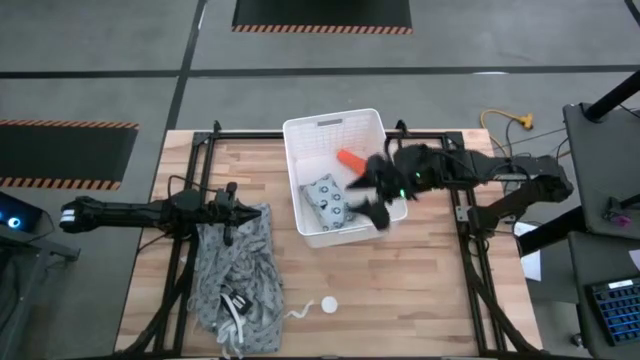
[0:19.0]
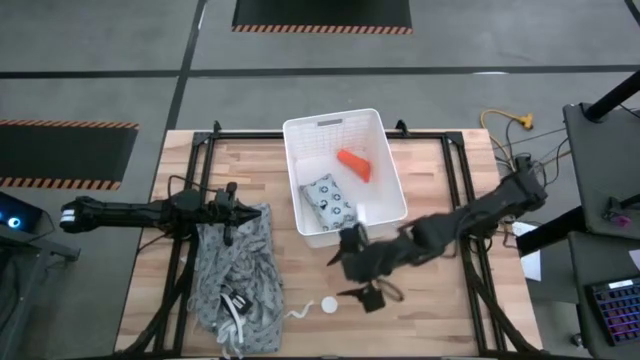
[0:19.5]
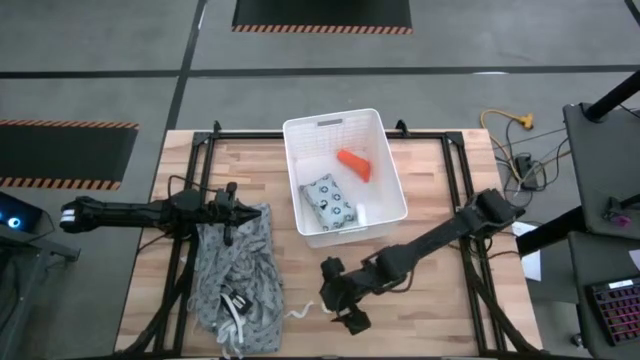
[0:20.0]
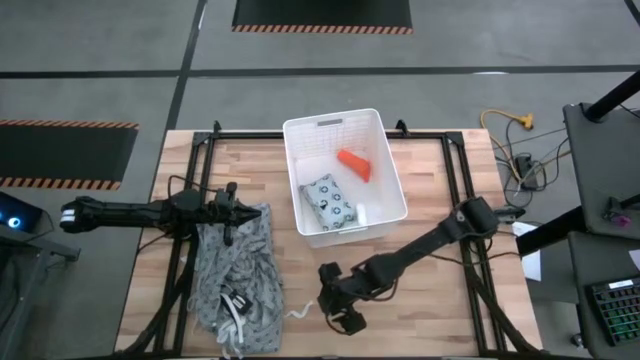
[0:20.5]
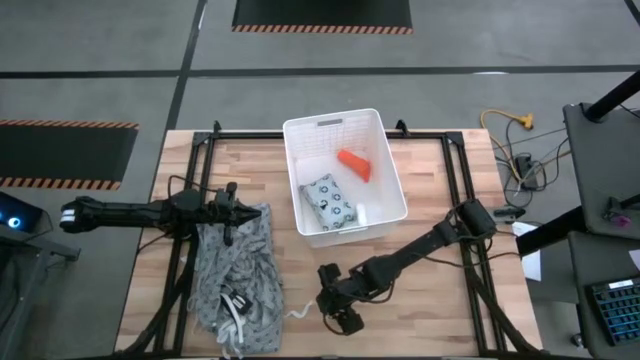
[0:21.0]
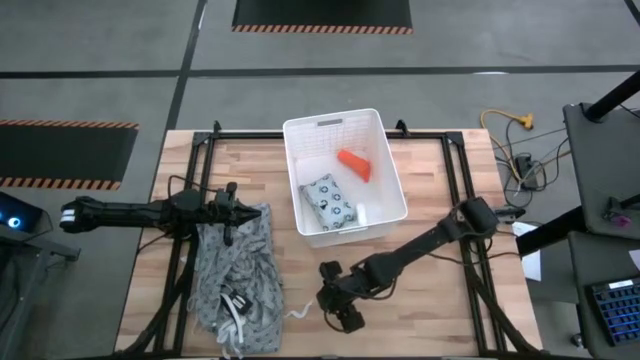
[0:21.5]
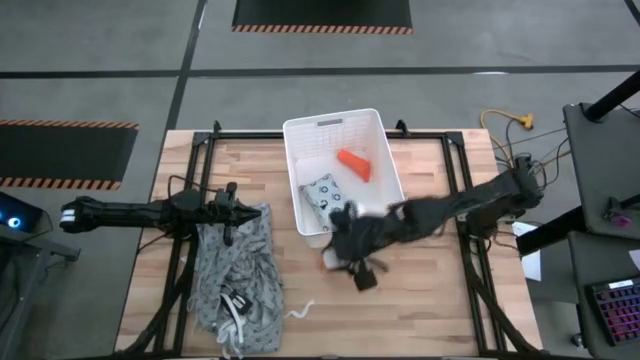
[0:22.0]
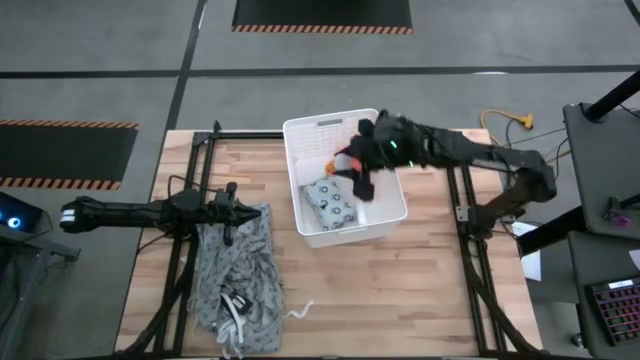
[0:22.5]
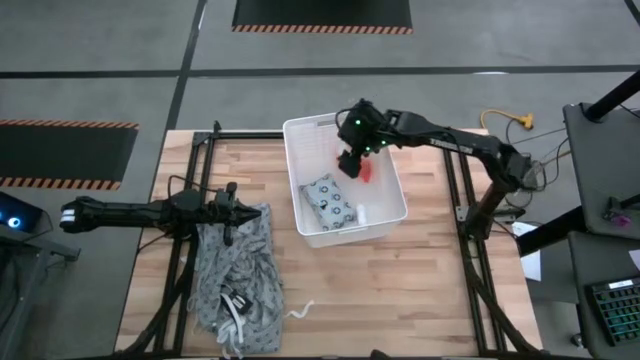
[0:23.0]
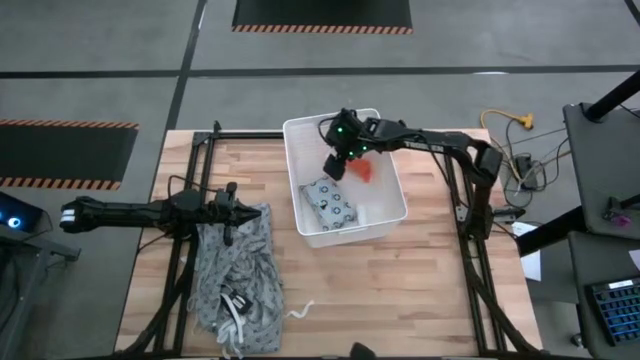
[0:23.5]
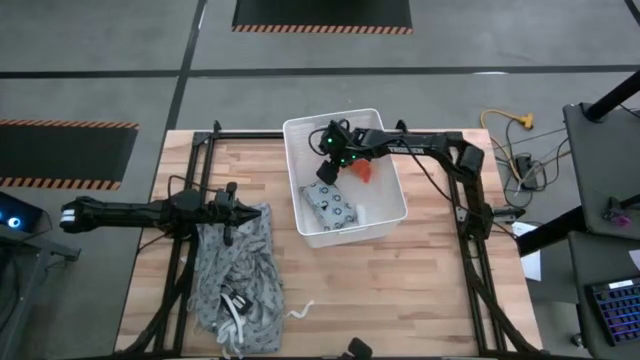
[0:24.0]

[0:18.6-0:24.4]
Task: Pick & place medical supplies in basket/bin
Put the orange pill bottle into the white bin

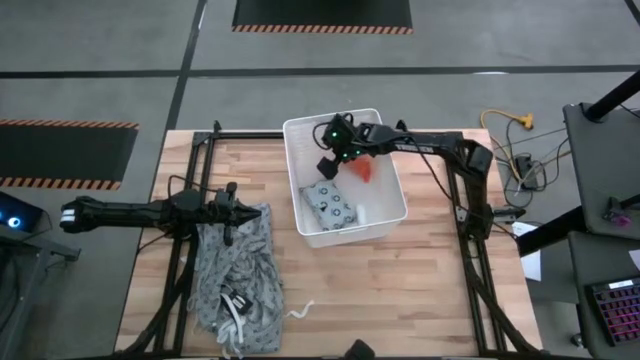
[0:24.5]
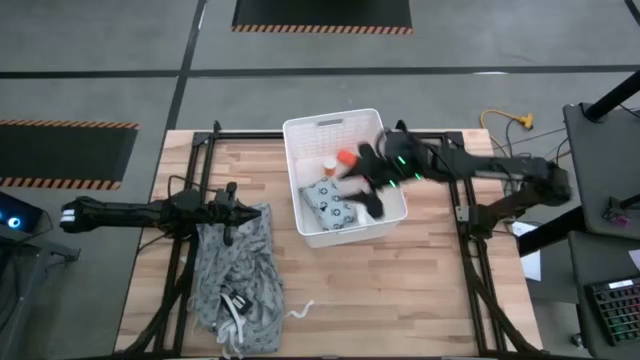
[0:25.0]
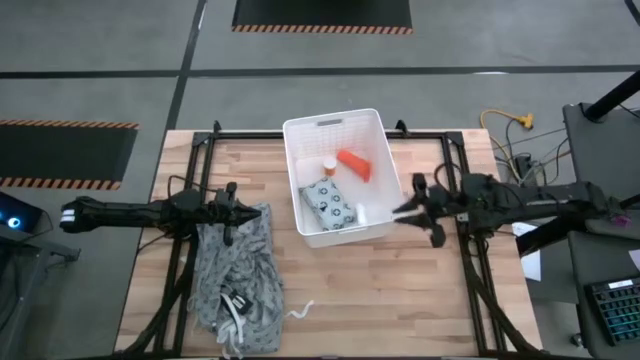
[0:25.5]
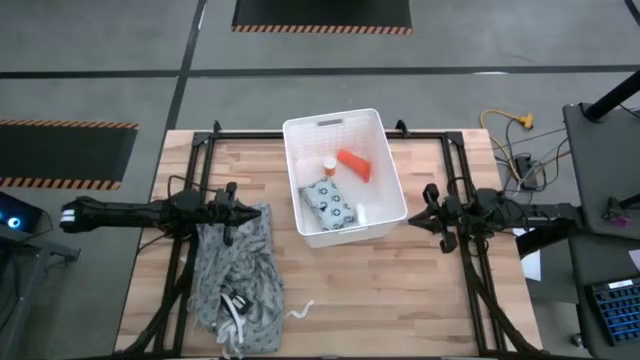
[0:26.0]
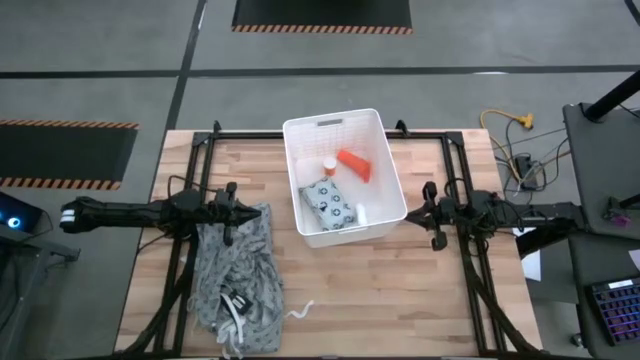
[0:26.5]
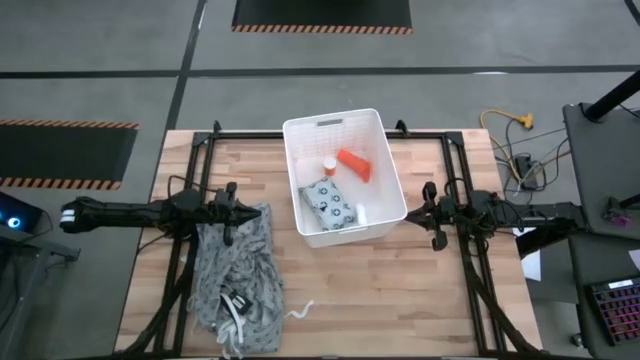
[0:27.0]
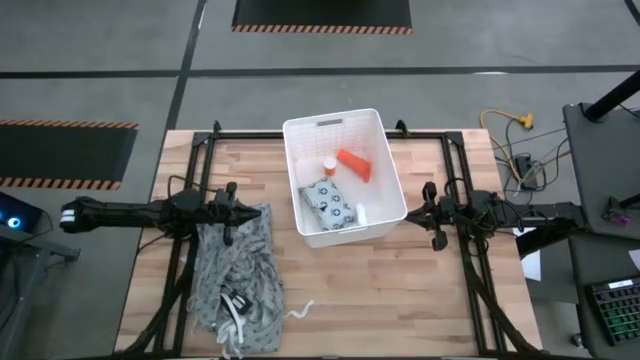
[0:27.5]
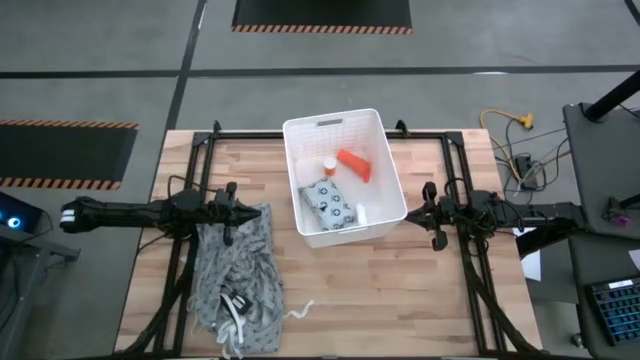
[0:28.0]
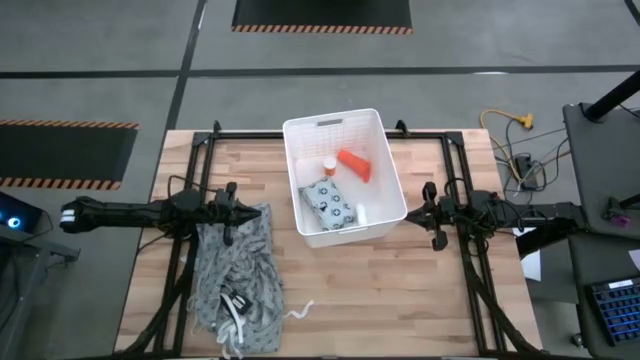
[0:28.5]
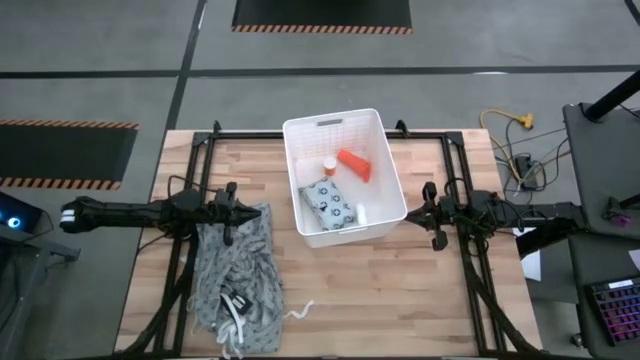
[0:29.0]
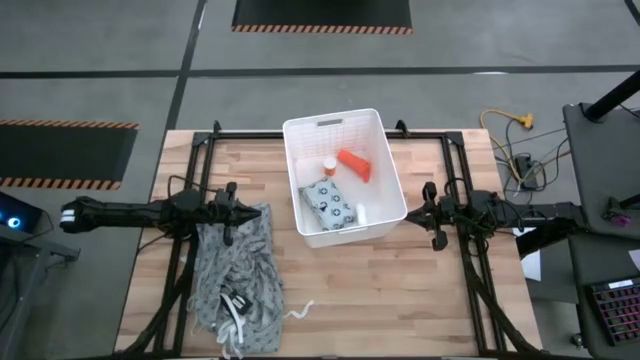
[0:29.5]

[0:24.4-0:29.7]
Return to Home Position

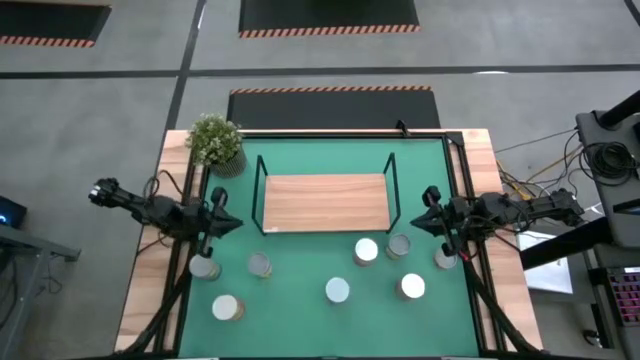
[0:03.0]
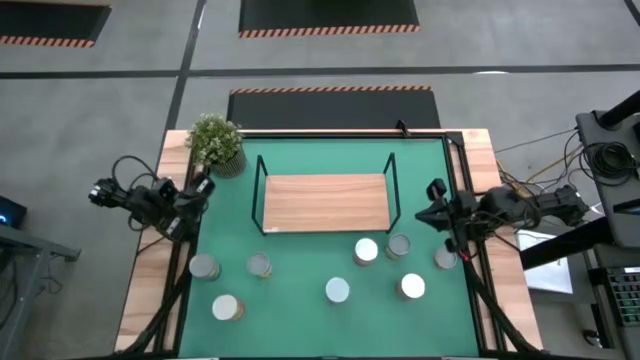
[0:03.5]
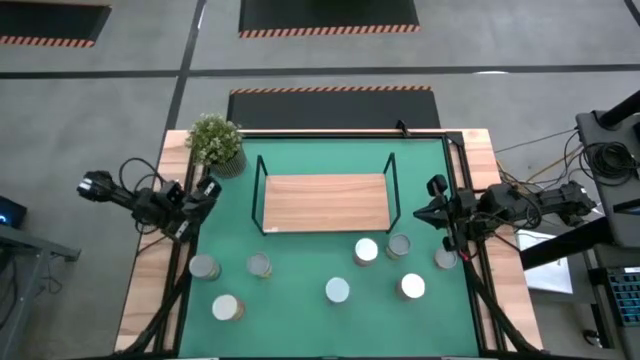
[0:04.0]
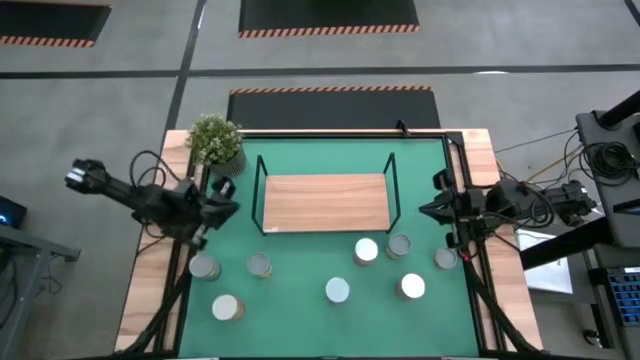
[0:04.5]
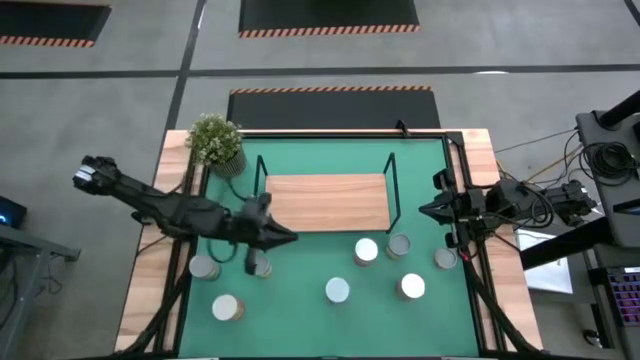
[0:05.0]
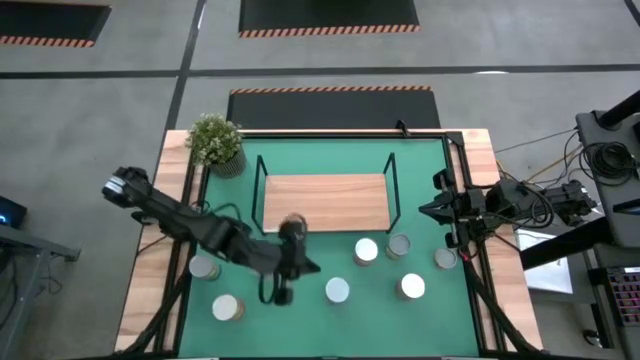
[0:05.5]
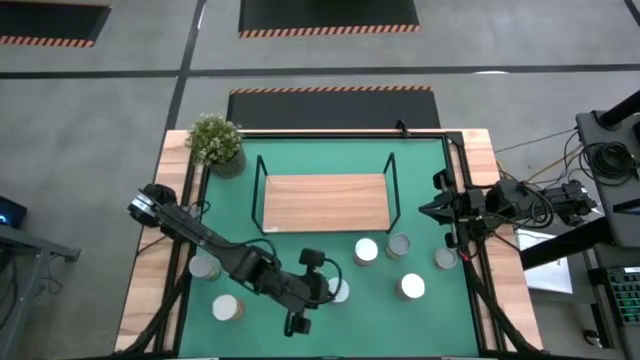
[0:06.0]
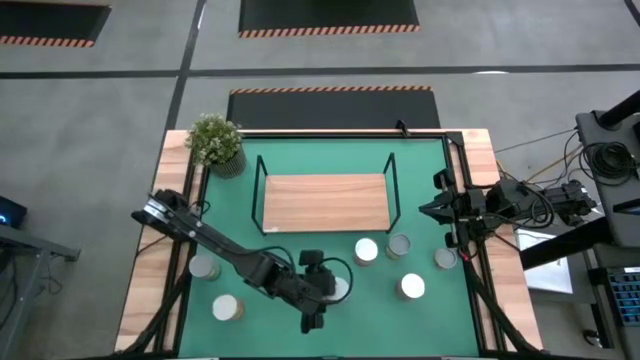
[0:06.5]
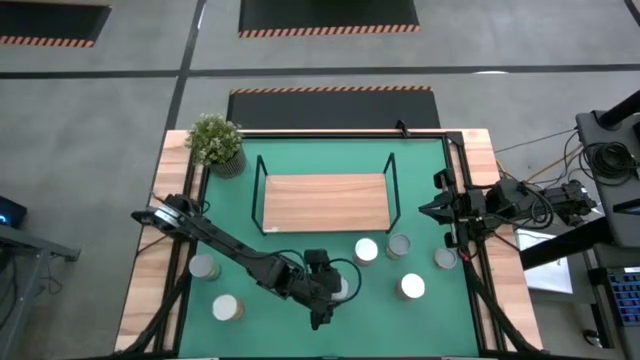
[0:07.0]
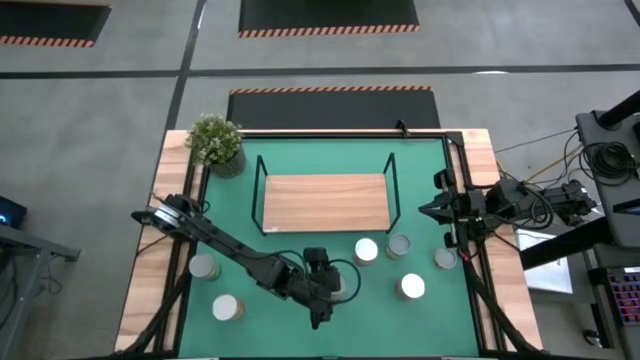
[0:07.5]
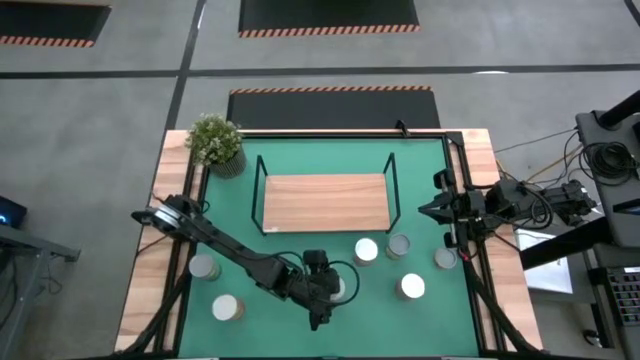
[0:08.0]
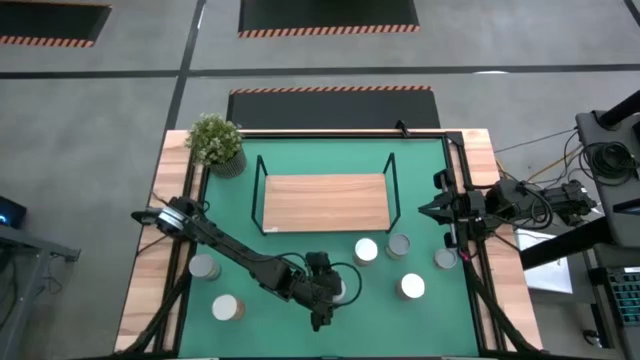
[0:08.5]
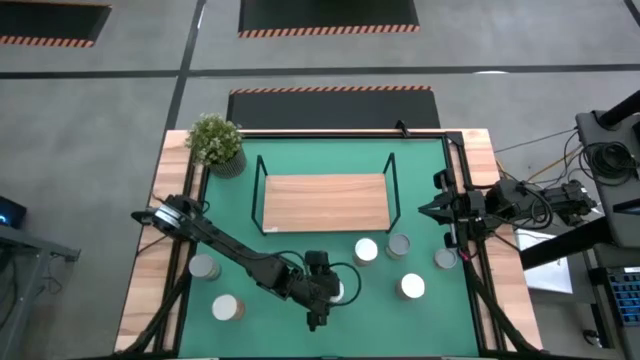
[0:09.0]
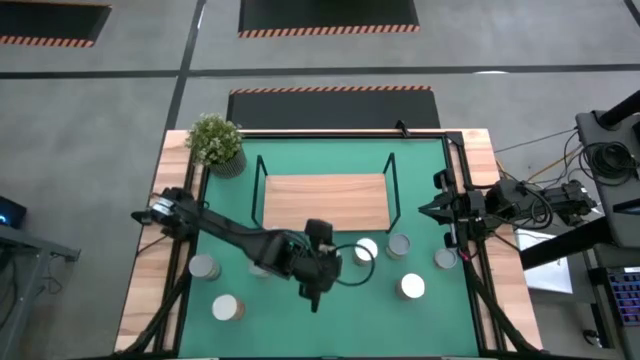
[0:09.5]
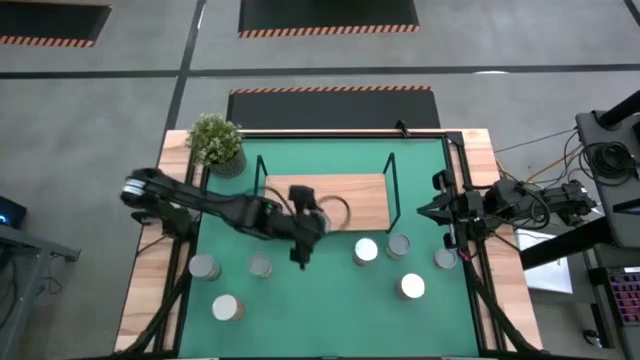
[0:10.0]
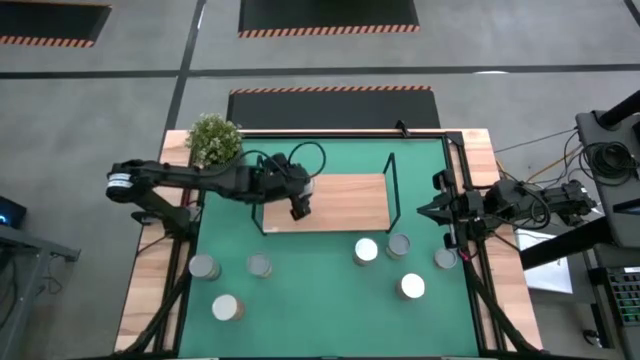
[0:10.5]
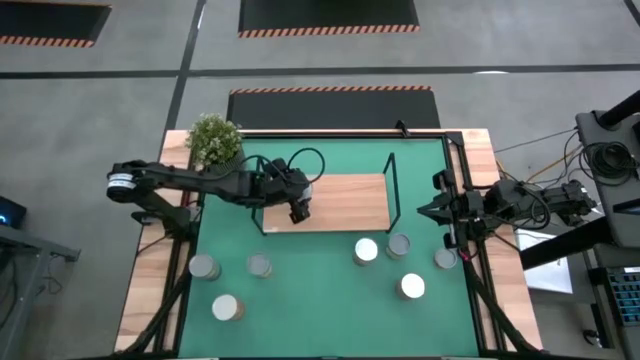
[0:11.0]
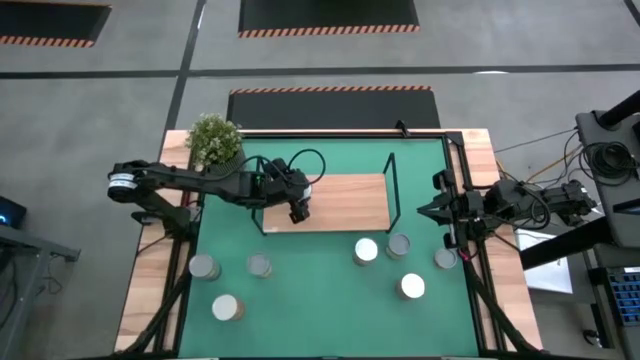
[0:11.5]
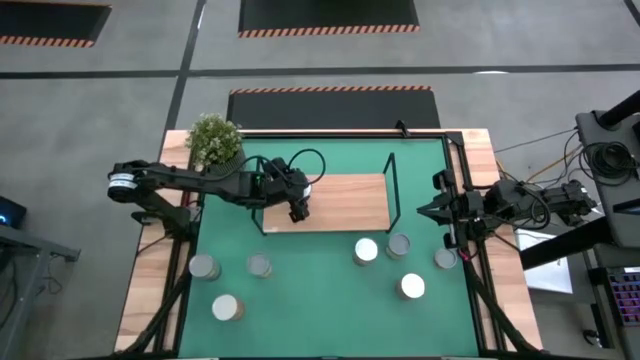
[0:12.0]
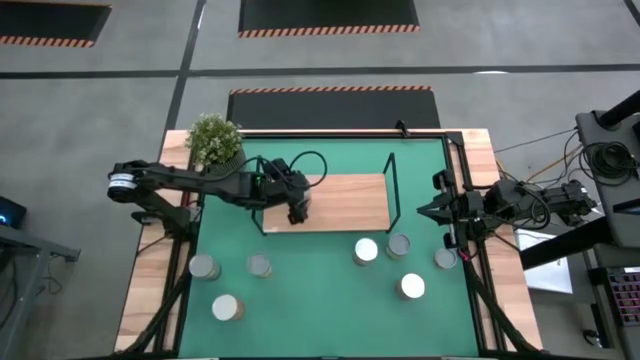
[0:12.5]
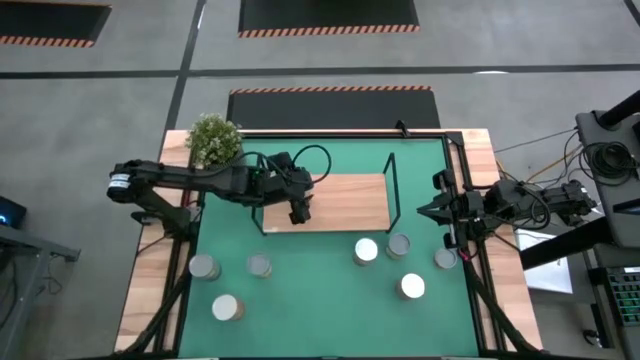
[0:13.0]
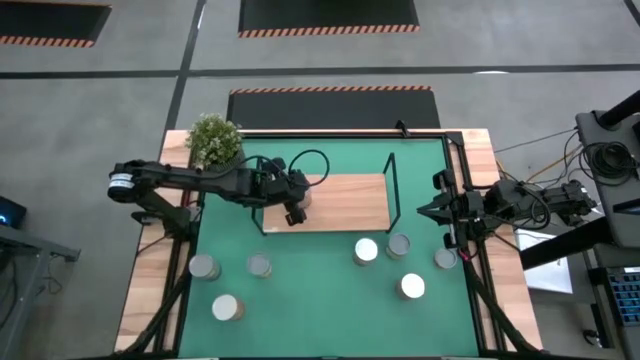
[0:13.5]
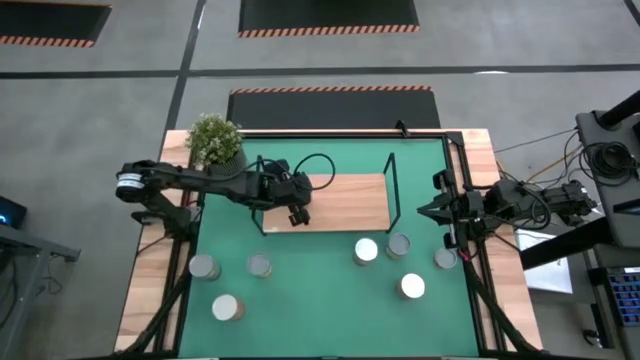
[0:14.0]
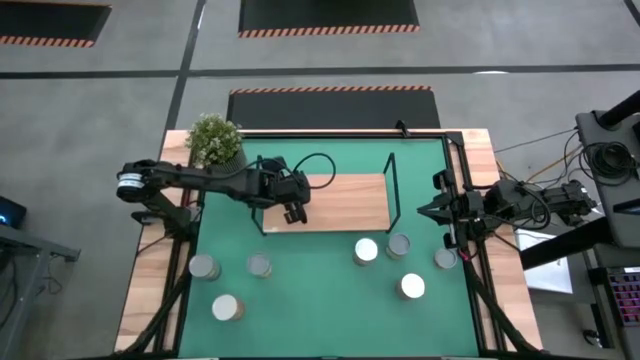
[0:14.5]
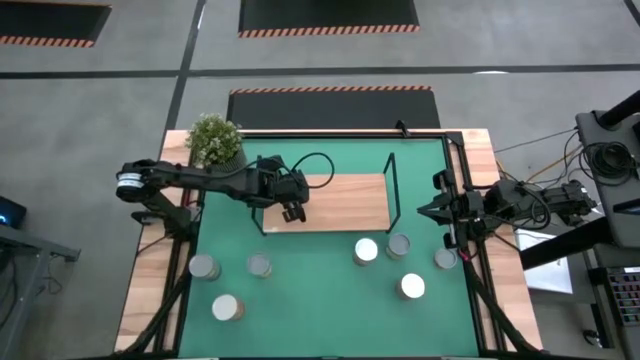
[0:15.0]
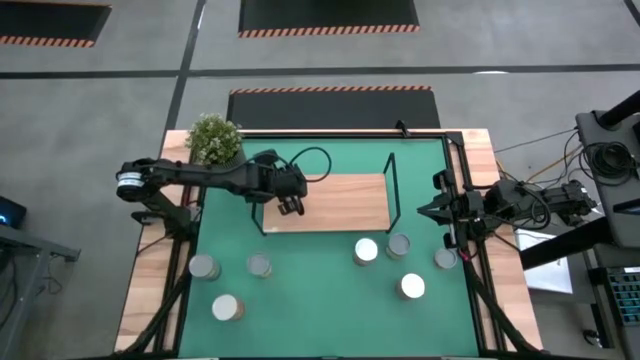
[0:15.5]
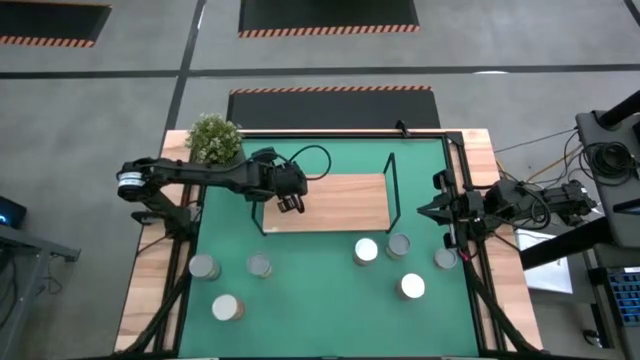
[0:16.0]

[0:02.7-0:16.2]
Task: Pick and place cans onto a shelf
Put the canned green beans on the shelf
